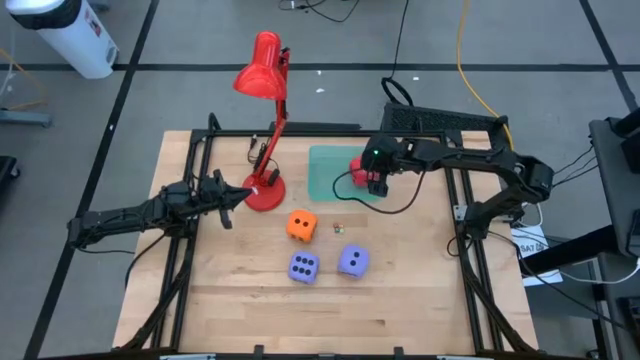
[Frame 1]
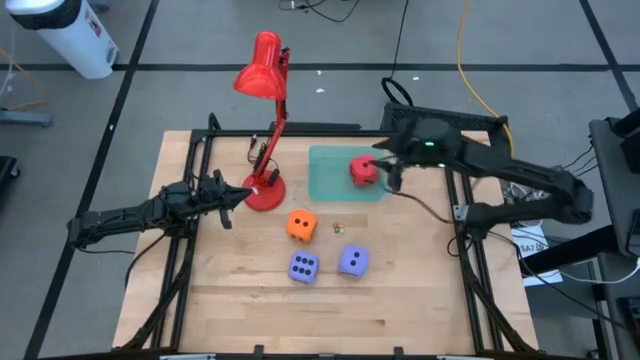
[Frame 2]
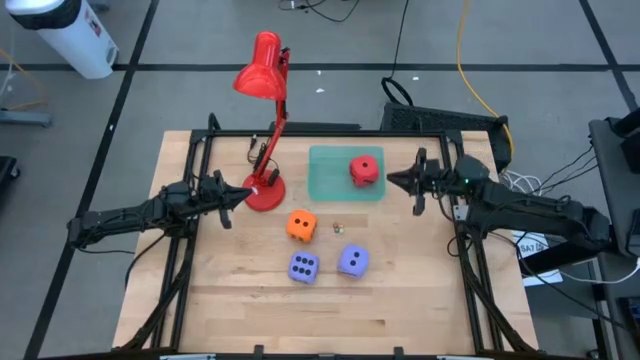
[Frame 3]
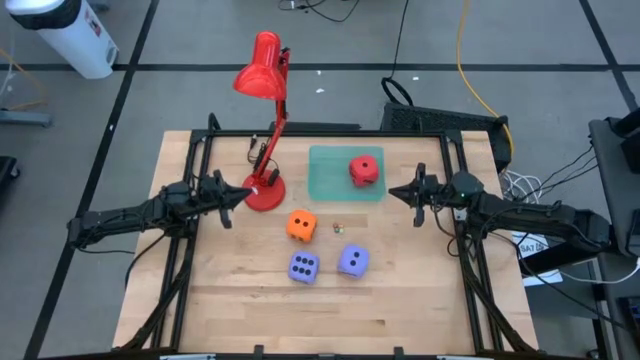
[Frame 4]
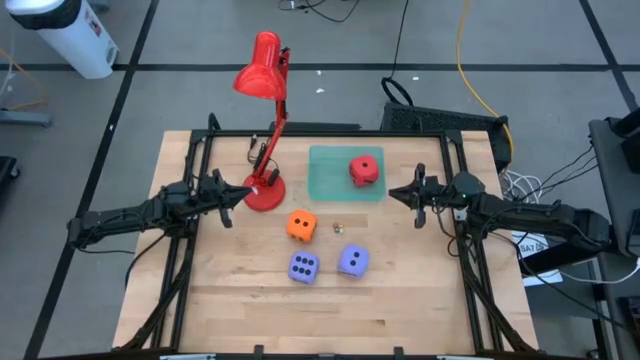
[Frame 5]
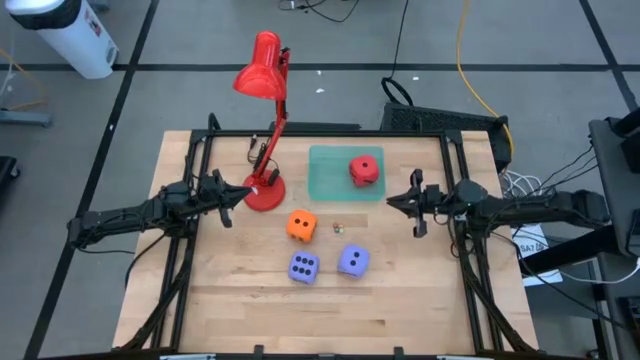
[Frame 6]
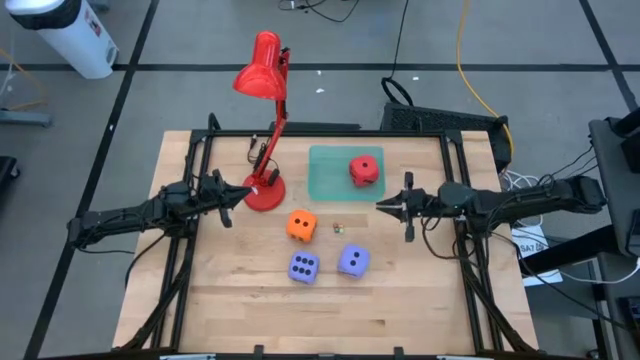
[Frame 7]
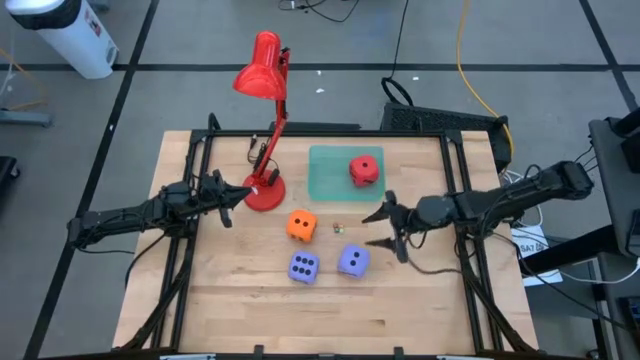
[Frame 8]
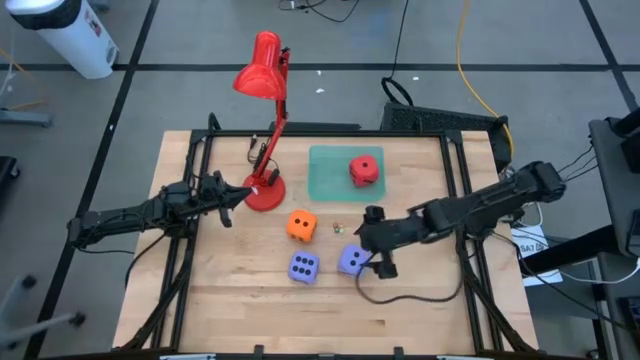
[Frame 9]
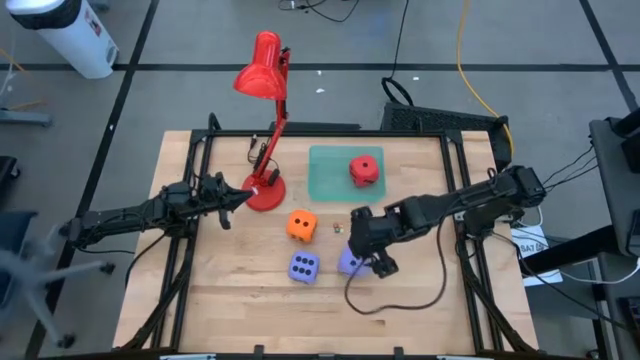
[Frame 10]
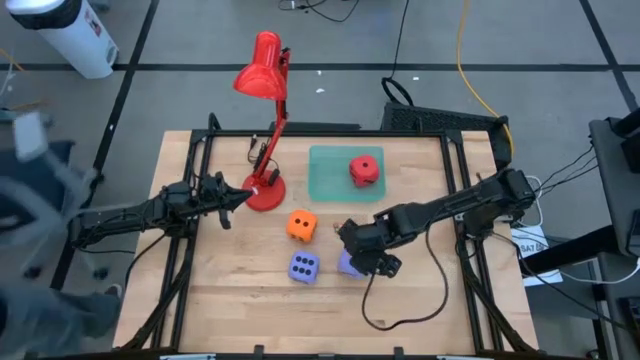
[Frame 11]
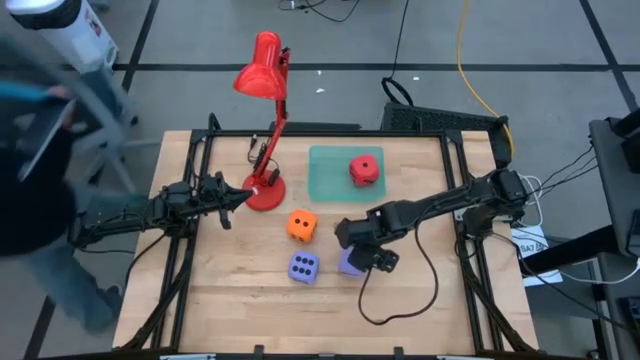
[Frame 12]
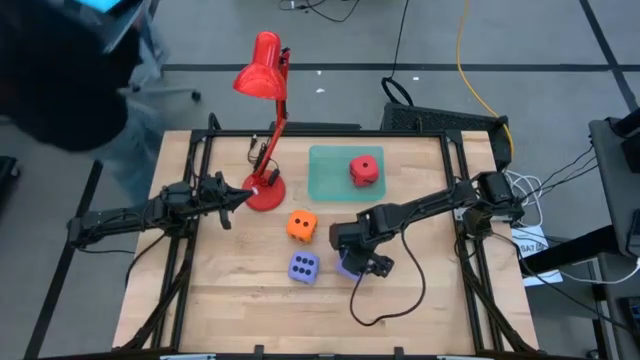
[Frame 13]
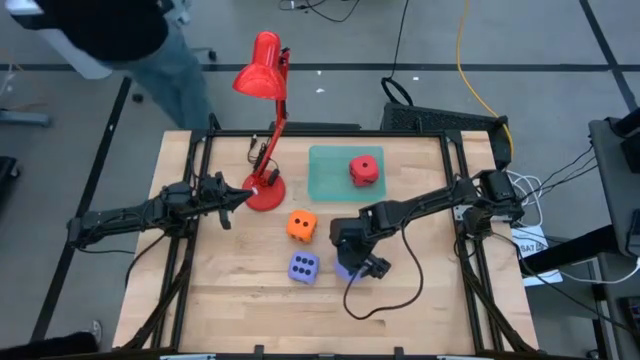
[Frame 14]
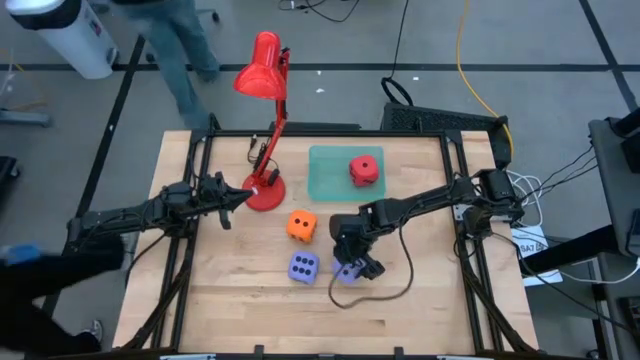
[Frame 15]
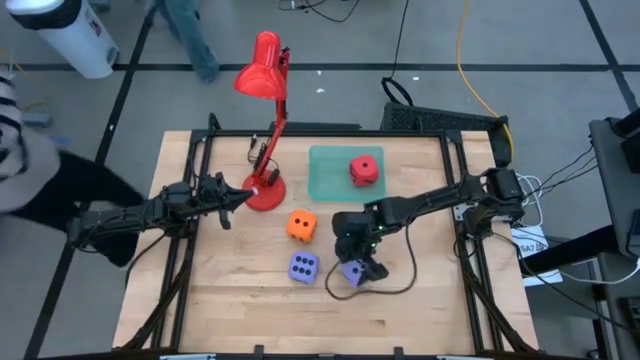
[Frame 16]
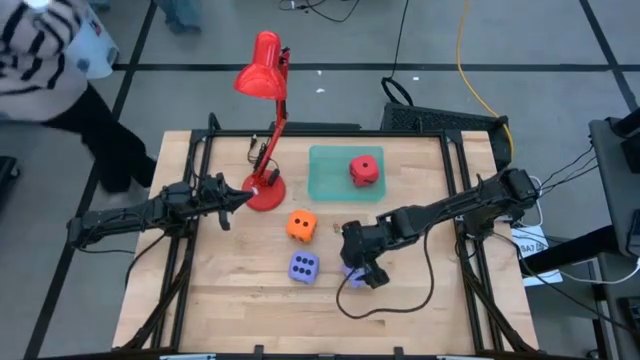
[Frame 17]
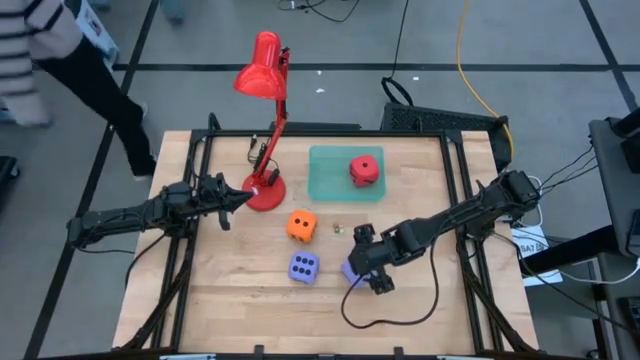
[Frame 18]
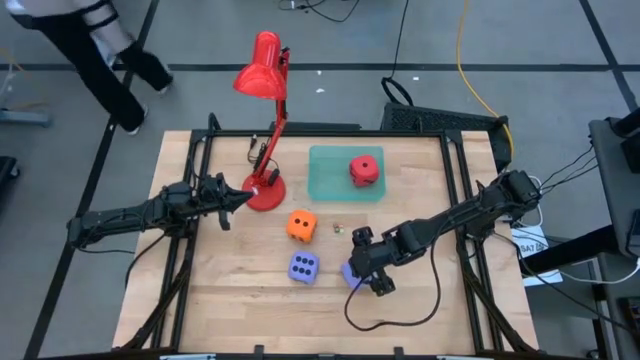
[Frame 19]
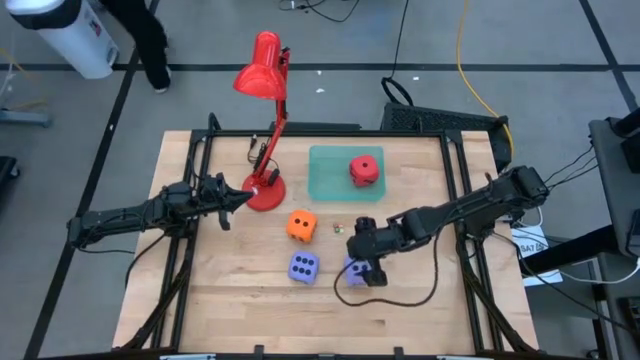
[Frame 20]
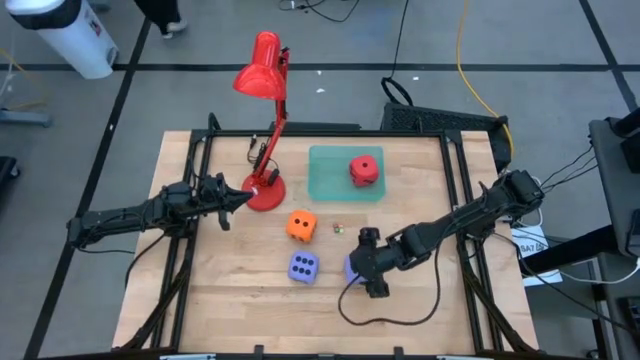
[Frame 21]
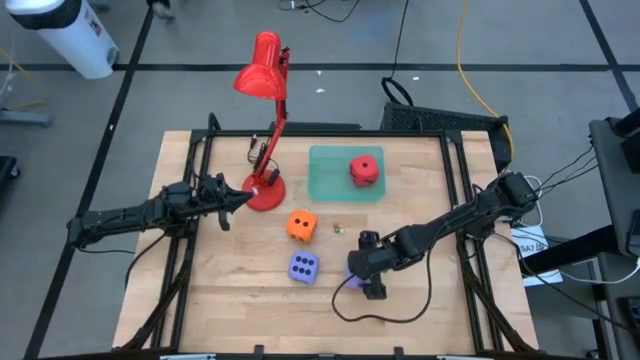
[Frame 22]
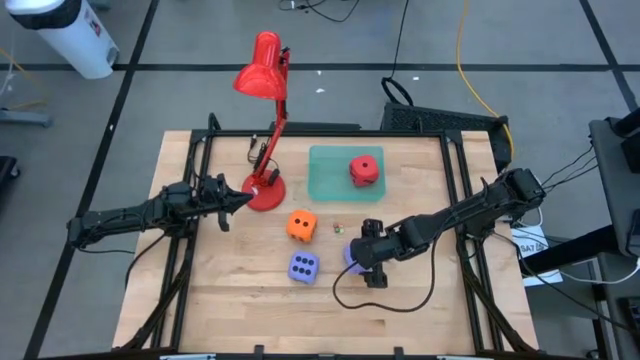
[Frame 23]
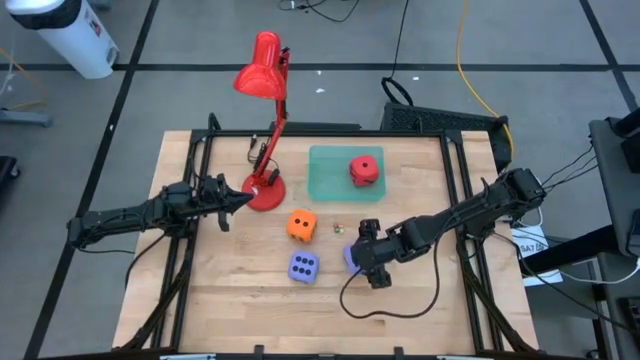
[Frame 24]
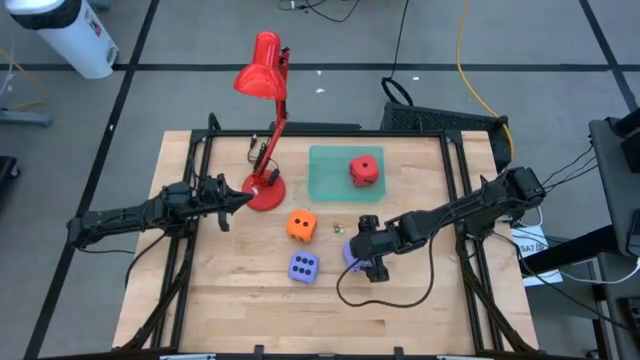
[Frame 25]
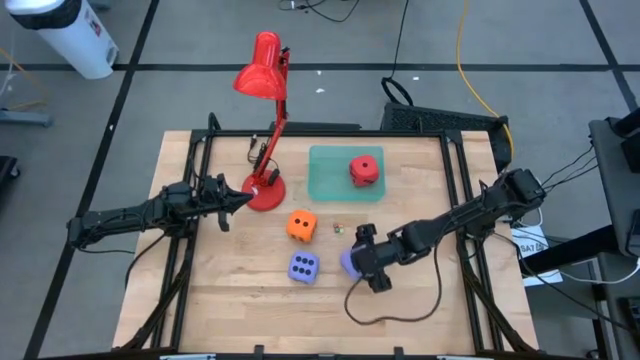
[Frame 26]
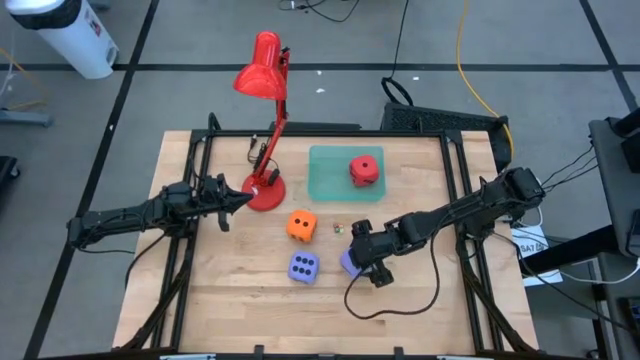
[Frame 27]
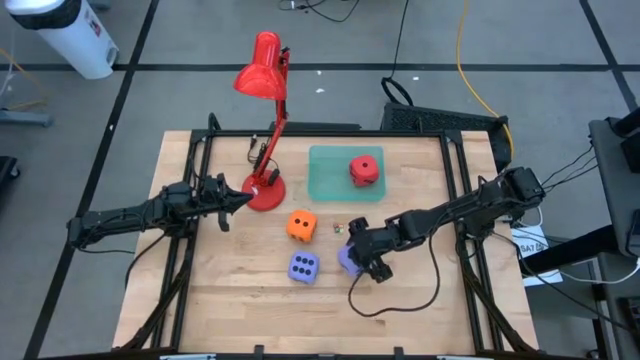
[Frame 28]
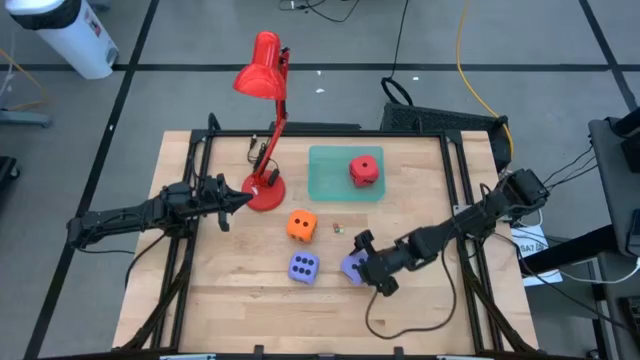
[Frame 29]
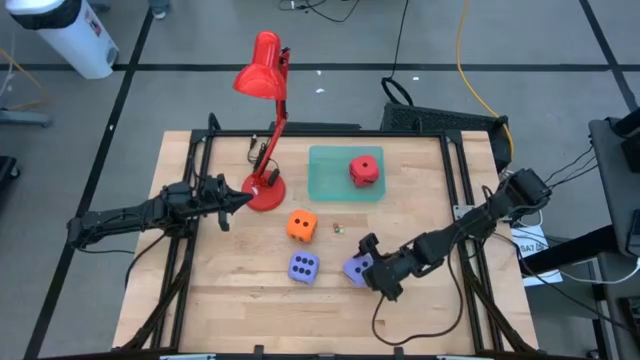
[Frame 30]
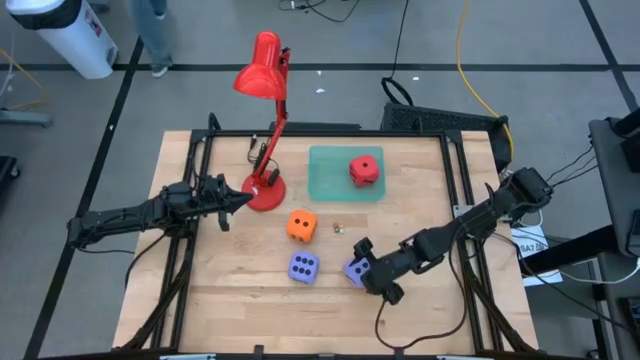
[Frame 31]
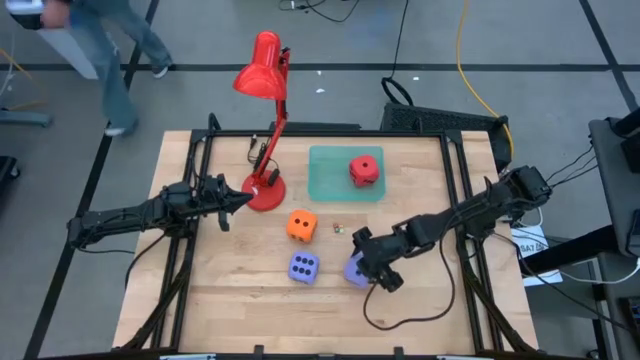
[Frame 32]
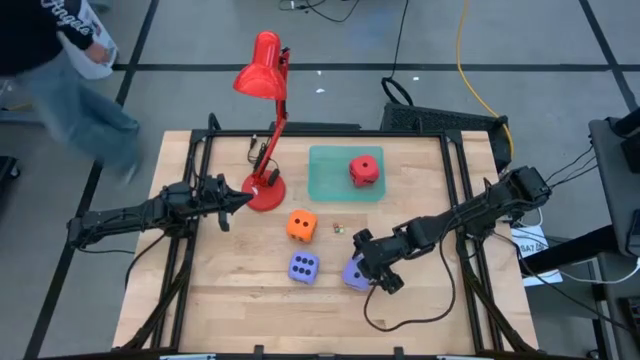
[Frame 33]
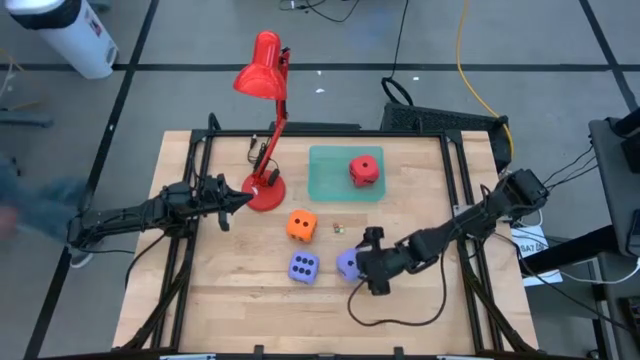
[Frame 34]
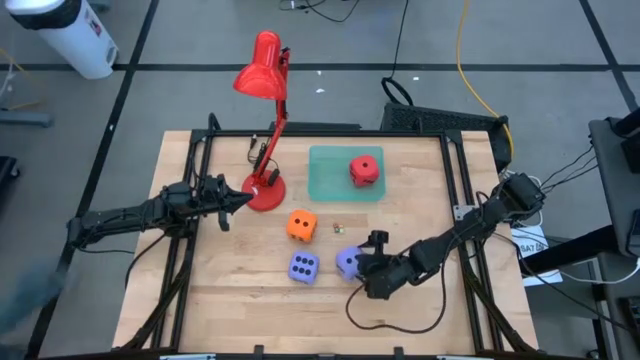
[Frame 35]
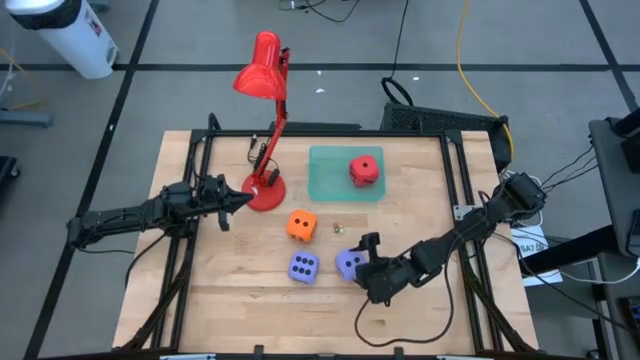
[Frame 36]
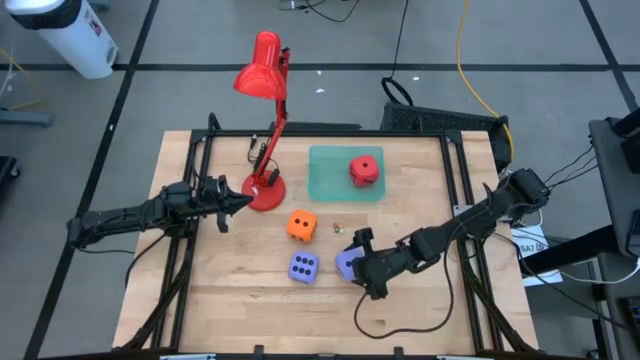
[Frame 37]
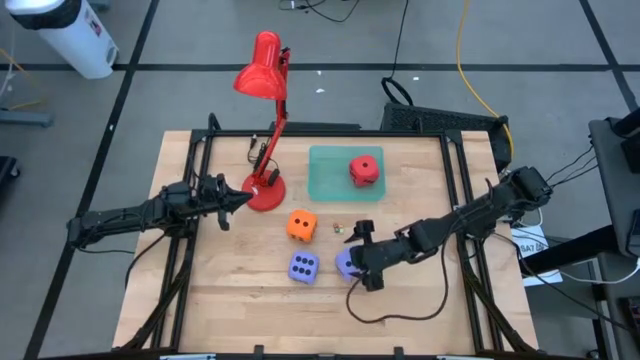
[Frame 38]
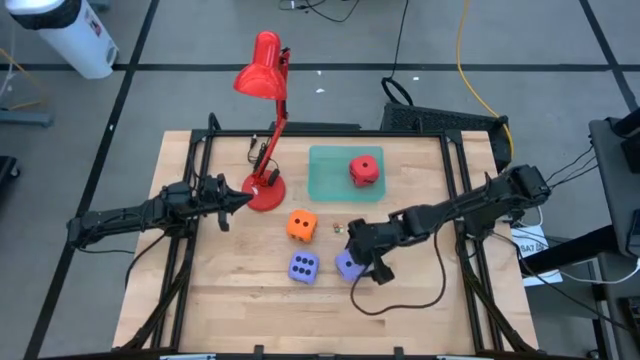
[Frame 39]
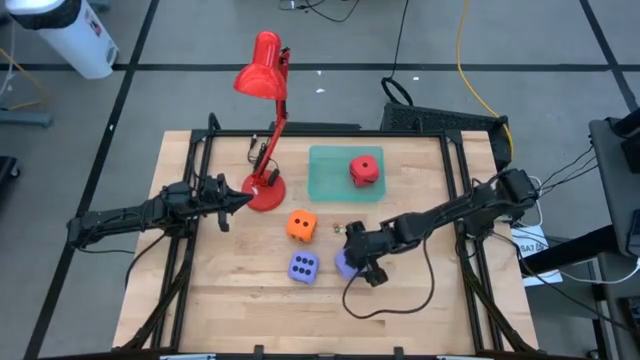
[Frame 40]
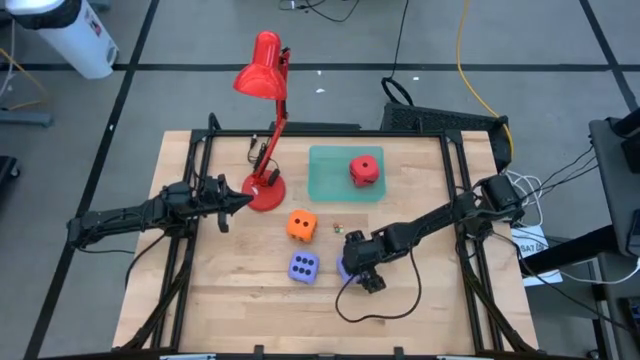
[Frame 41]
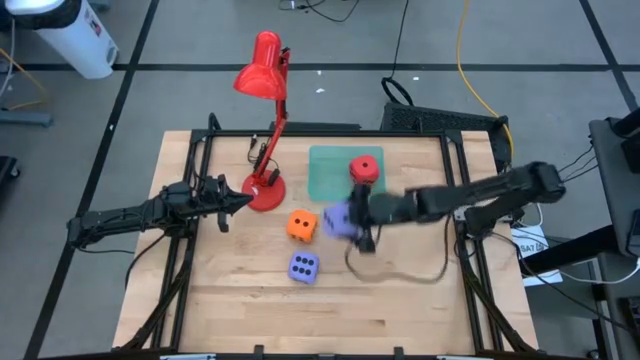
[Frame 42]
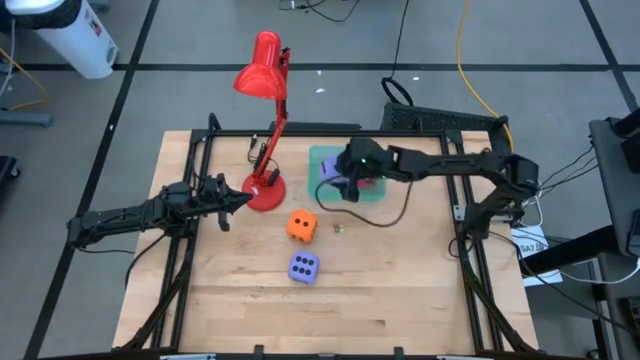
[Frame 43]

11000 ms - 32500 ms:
Task: Pick & Place Dice
Put the right large purple die into the green bin
